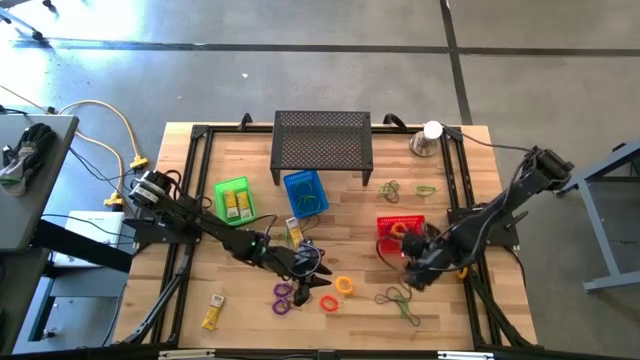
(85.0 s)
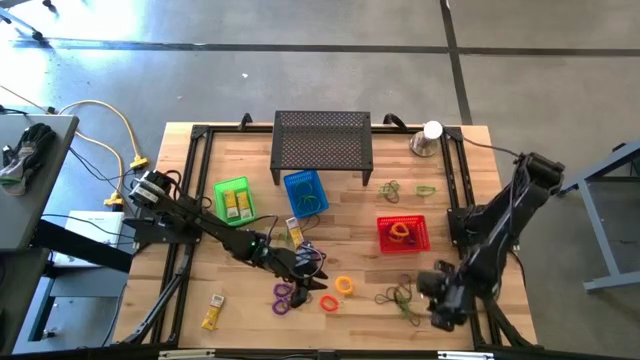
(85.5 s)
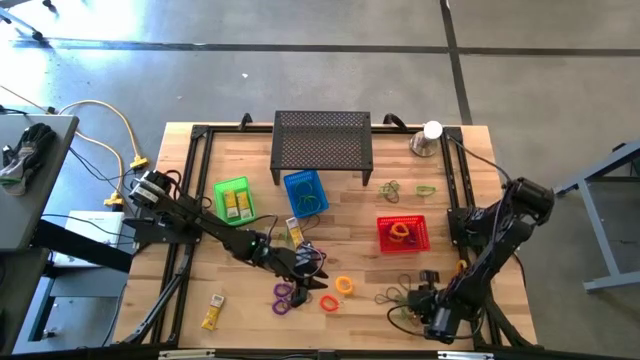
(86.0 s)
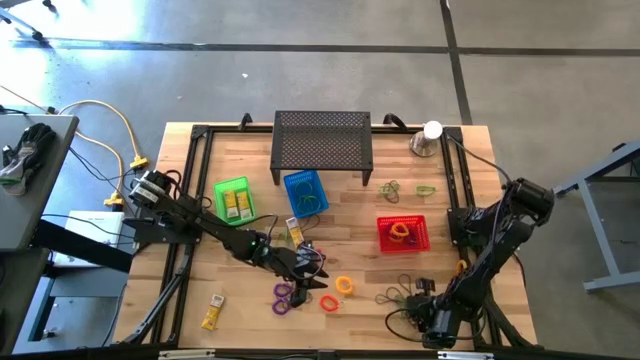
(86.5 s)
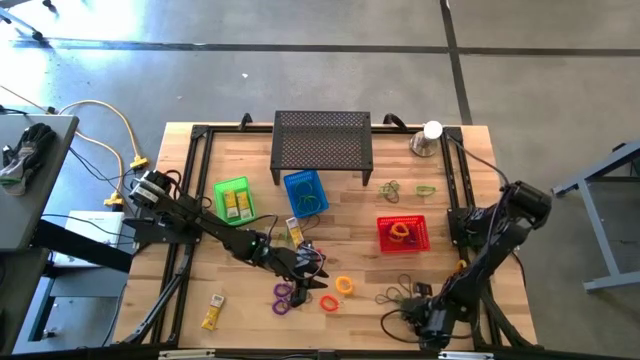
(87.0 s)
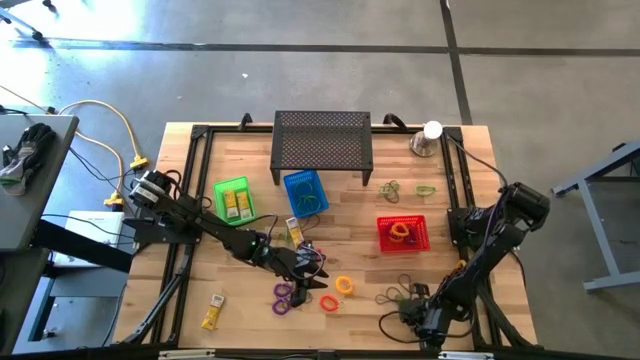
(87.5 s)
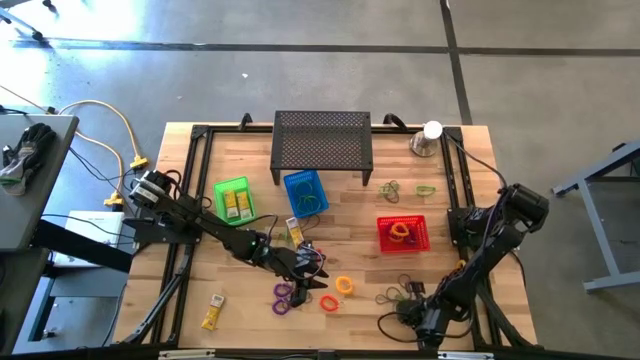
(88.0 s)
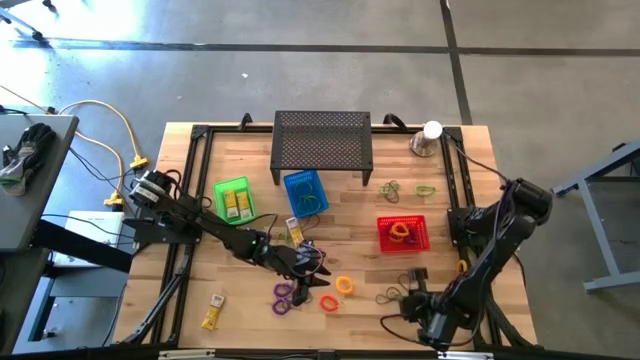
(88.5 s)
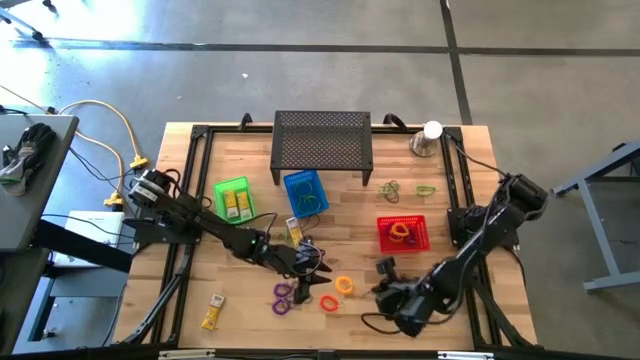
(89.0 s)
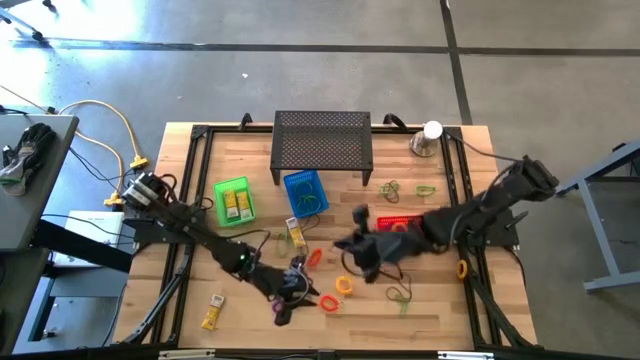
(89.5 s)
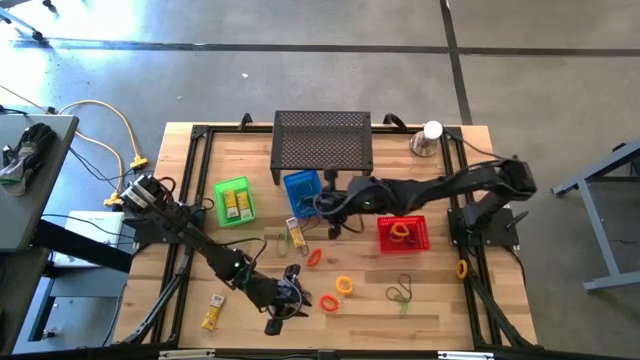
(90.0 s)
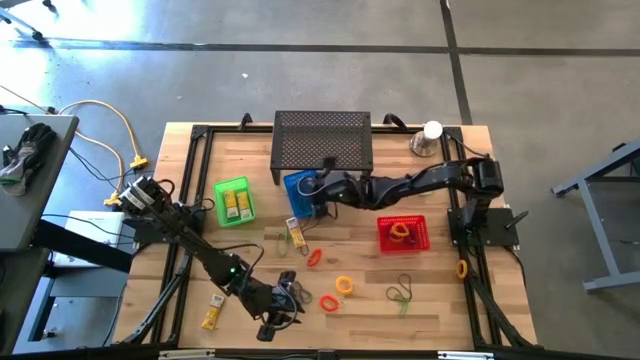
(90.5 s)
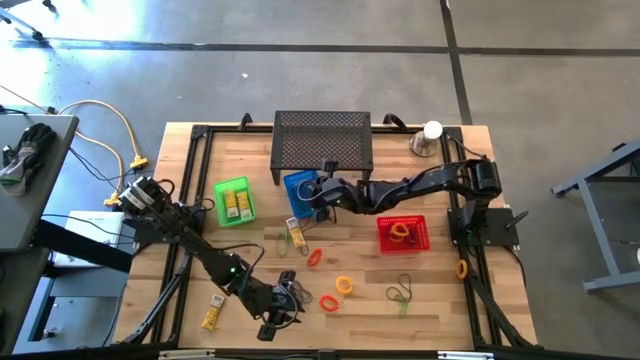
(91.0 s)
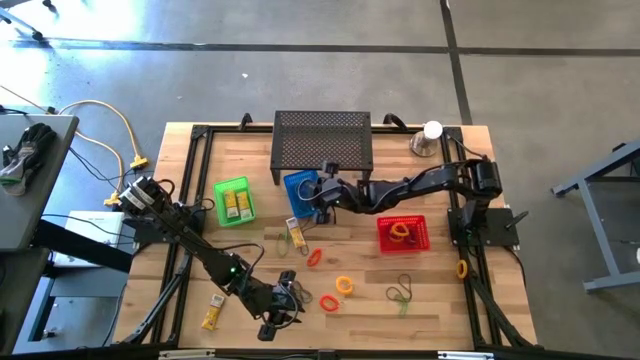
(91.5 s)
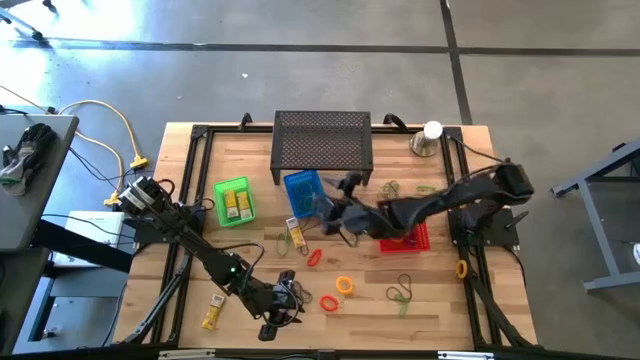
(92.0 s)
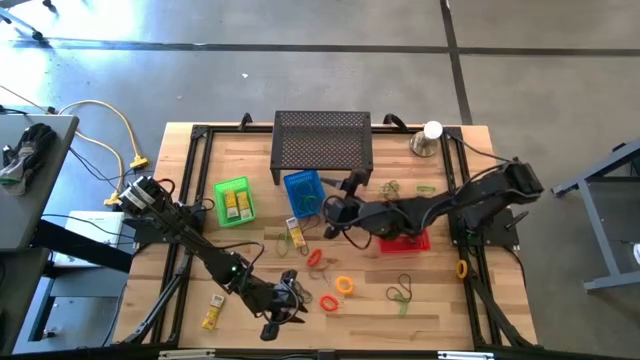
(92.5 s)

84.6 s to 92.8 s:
Task: Pick & Place Office Desk Supplies
Put the violet rubber band into the blue basket

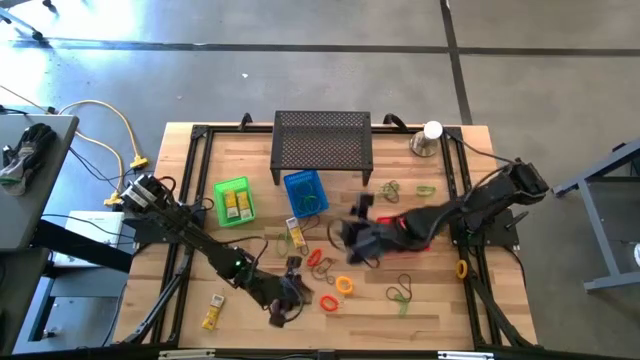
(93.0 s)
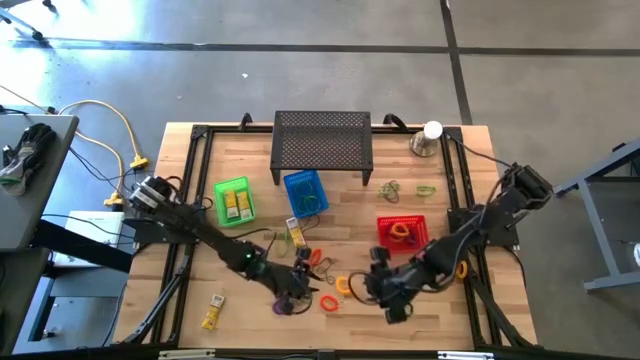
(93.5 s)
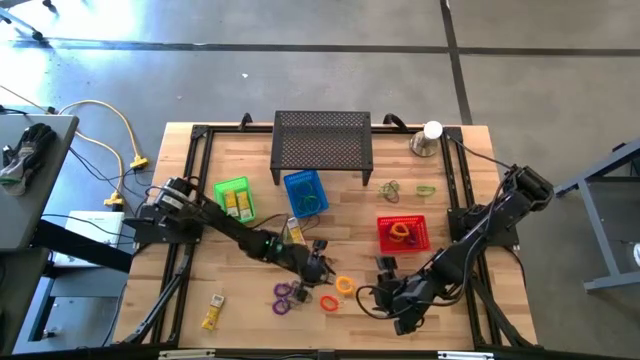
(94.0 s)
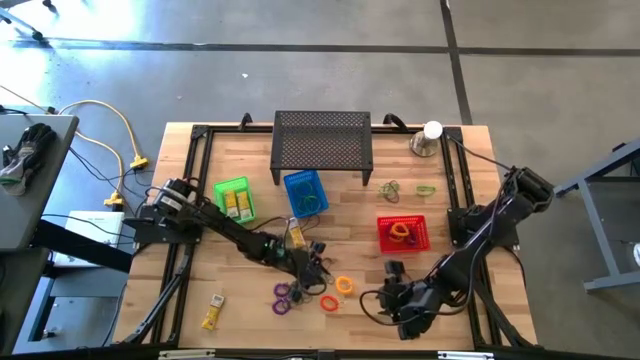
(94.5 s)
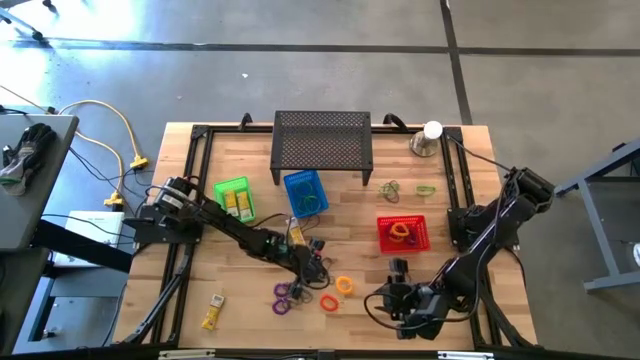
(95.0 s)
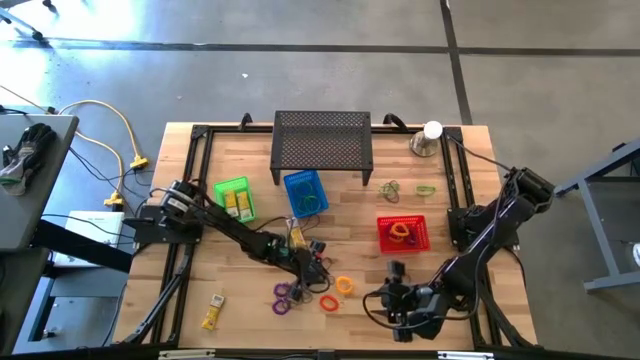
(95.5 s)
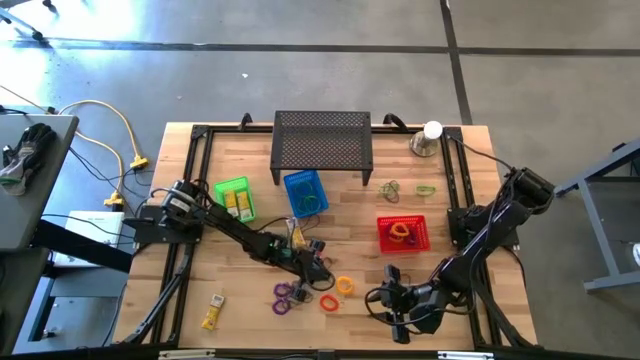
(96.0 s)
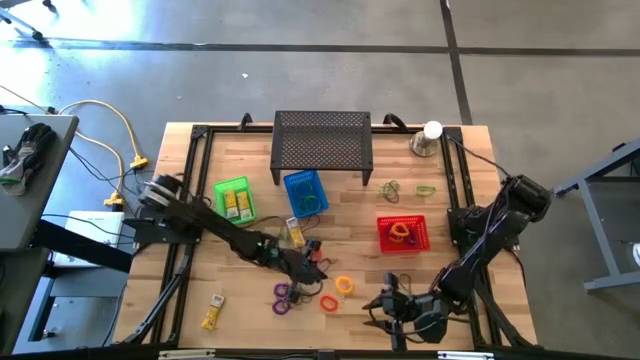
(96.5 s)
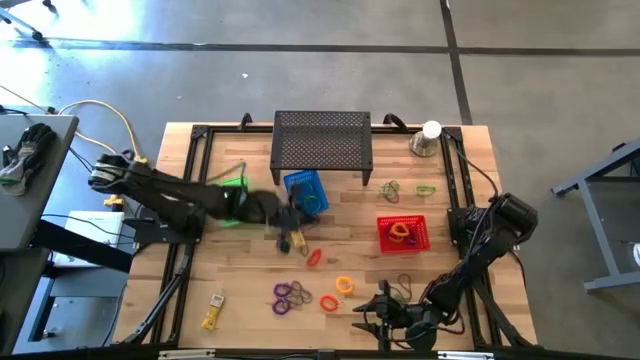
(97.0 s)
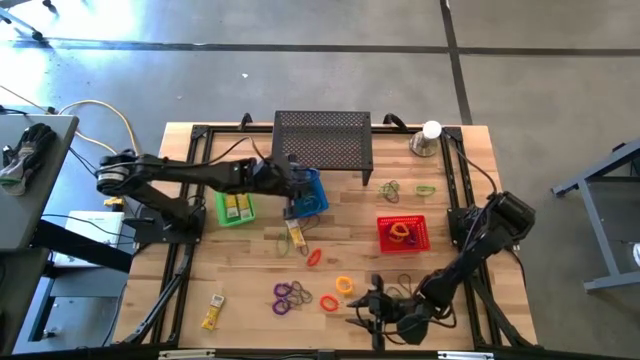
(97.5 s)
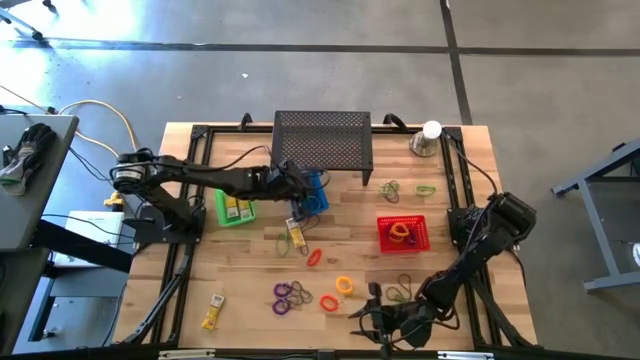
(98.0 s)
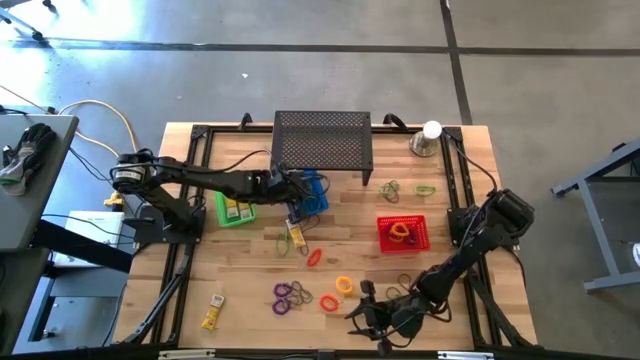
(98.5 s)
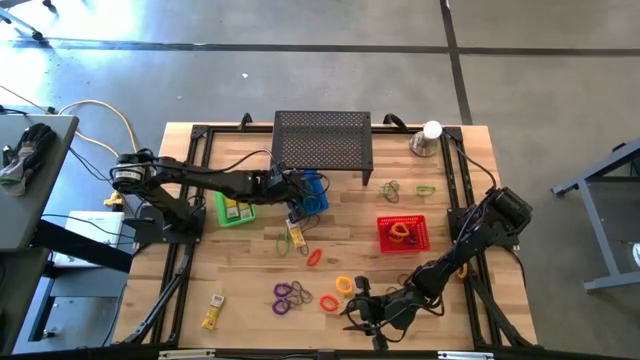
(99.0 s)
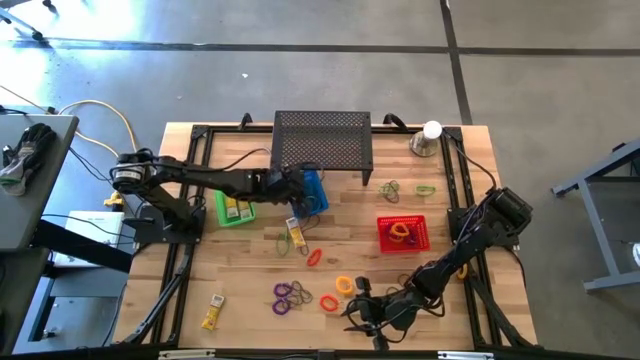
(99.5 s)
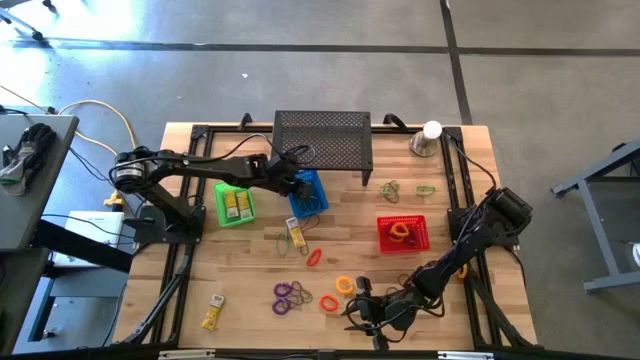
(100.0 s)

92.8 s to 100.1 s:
Put the violet rubber band into the blue basket

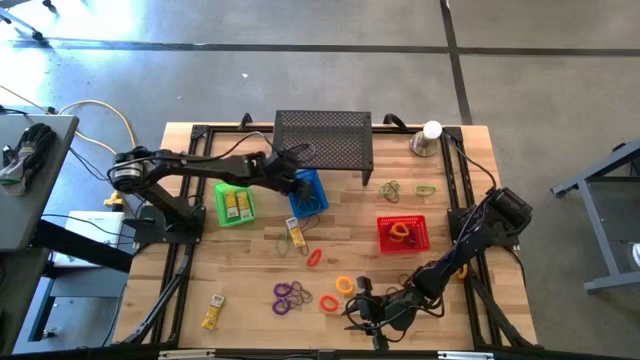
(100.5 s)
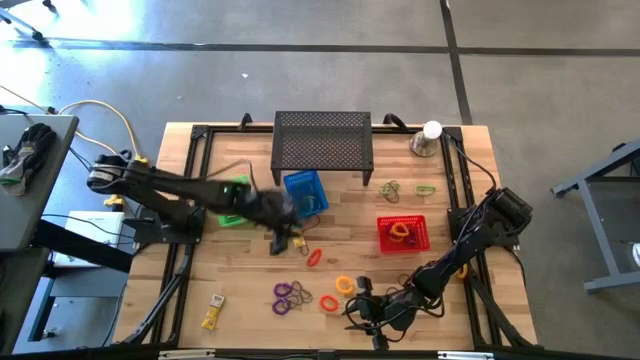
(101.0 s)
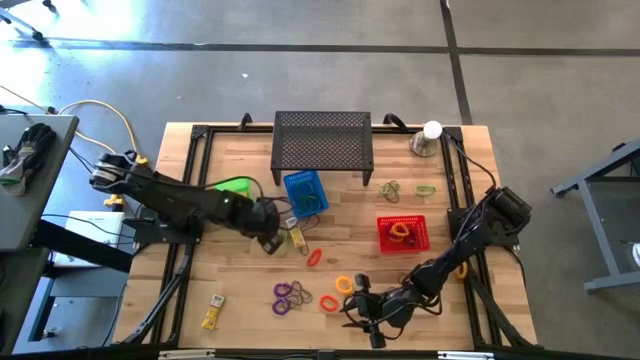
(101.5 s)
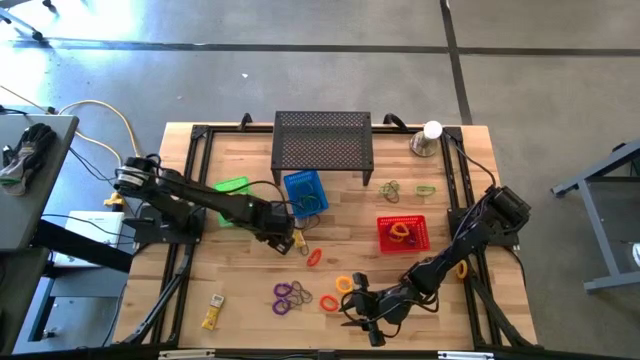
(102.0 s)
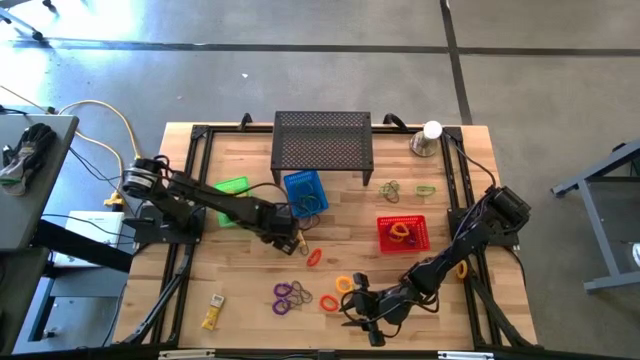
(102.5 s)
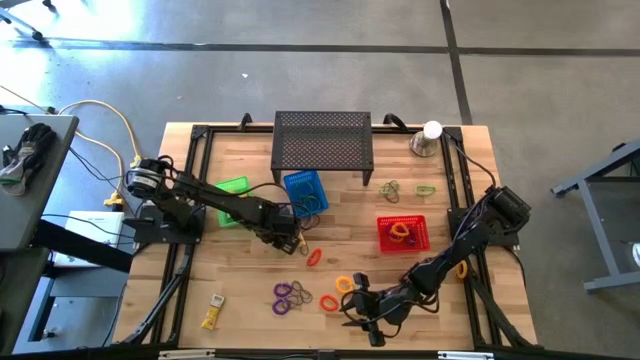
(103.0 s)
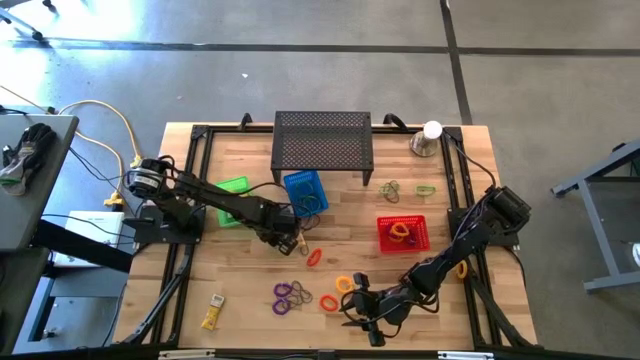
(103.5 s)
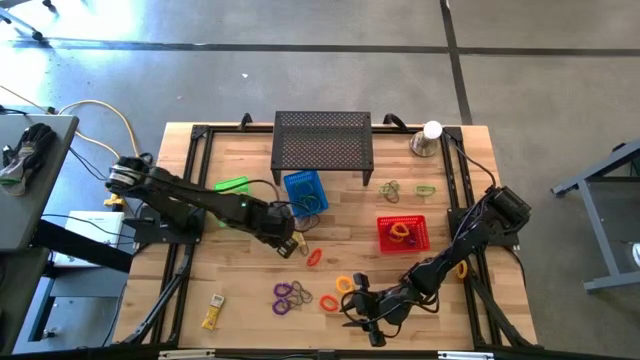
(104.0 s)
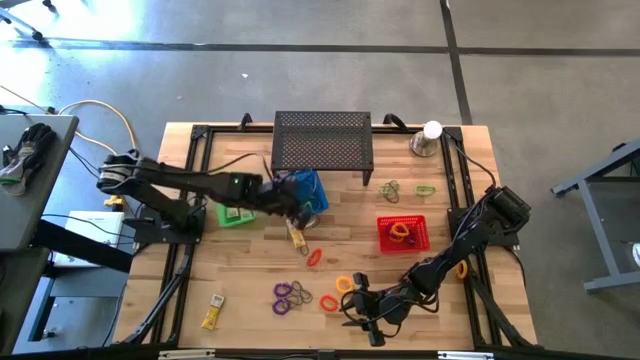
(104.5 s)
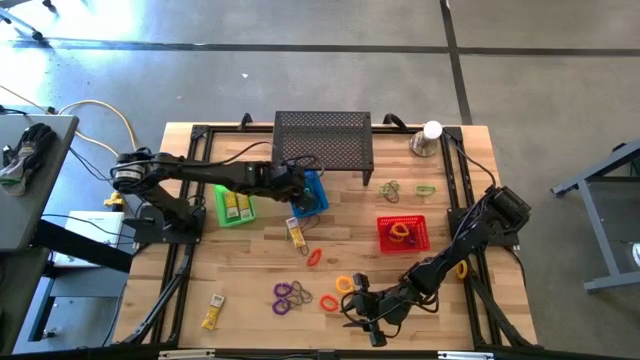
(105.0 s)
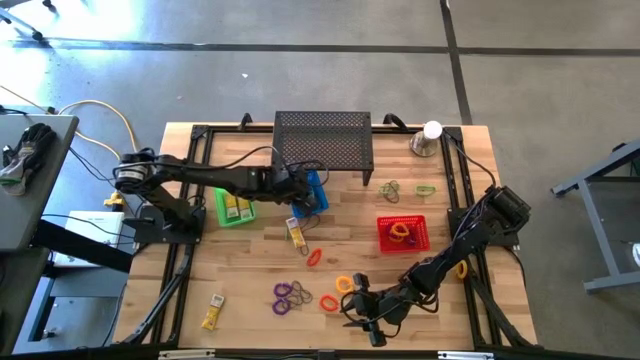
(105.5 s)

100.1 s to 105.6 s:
Put the green rubber band into the blue basket
